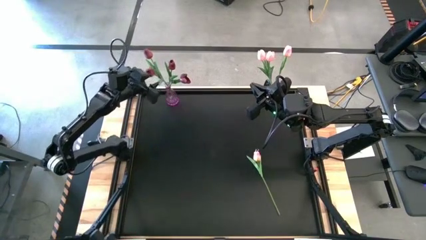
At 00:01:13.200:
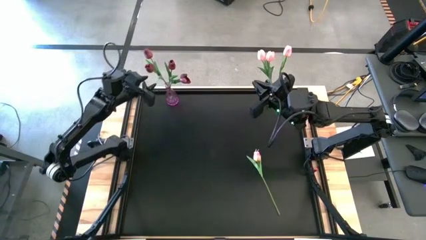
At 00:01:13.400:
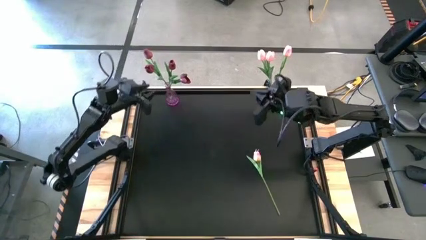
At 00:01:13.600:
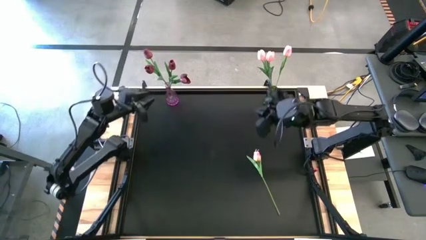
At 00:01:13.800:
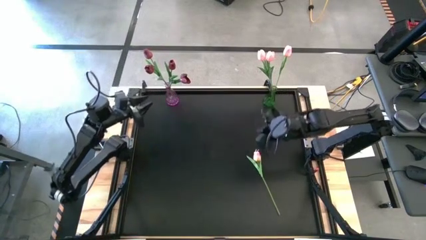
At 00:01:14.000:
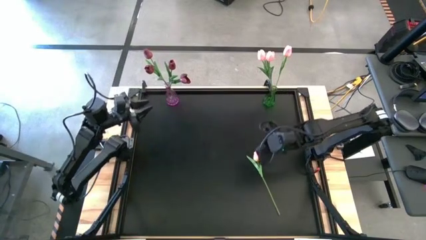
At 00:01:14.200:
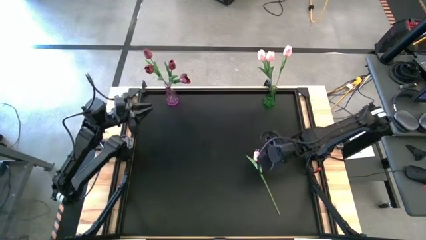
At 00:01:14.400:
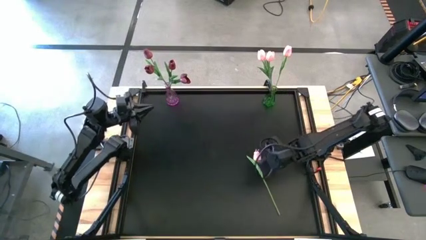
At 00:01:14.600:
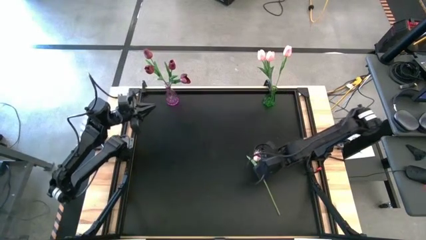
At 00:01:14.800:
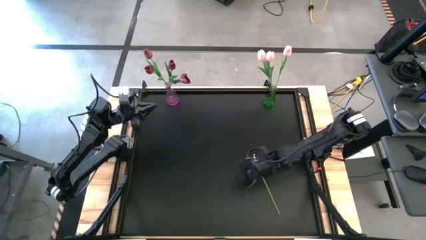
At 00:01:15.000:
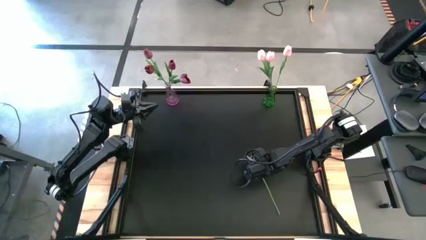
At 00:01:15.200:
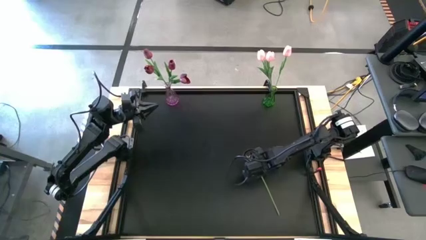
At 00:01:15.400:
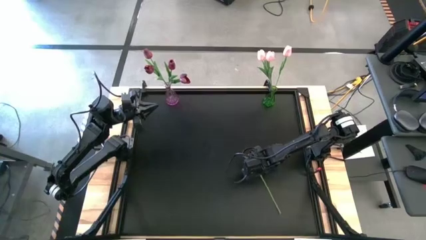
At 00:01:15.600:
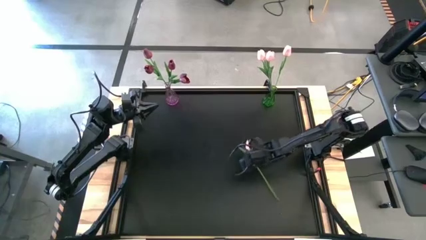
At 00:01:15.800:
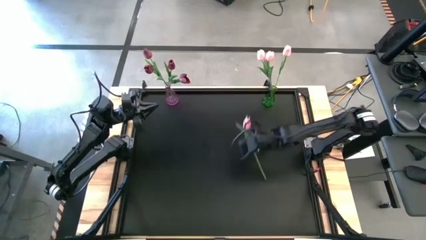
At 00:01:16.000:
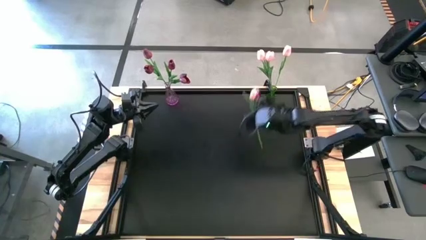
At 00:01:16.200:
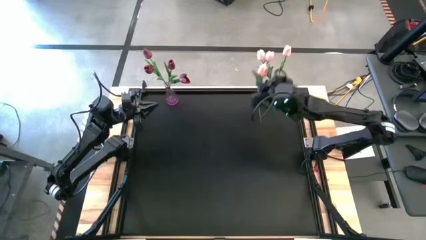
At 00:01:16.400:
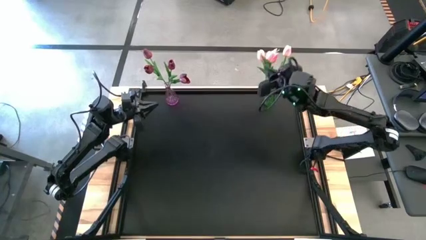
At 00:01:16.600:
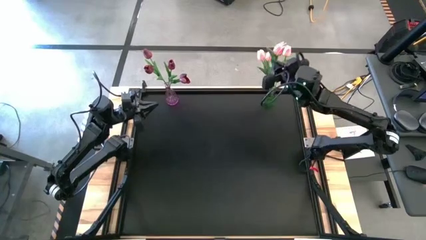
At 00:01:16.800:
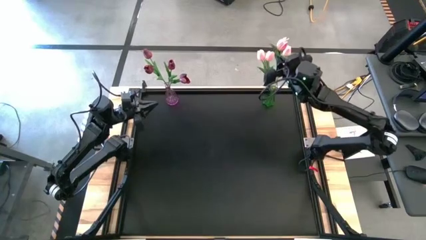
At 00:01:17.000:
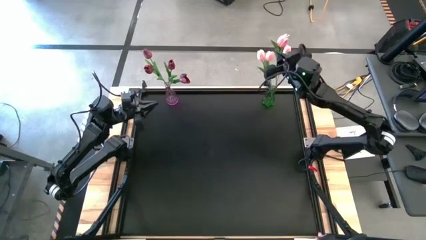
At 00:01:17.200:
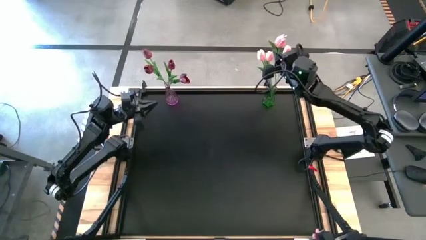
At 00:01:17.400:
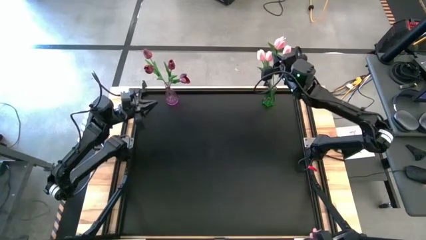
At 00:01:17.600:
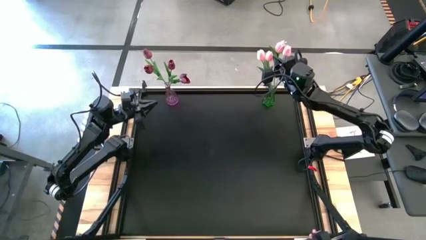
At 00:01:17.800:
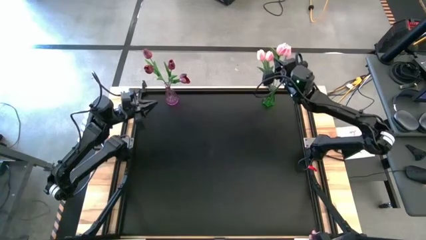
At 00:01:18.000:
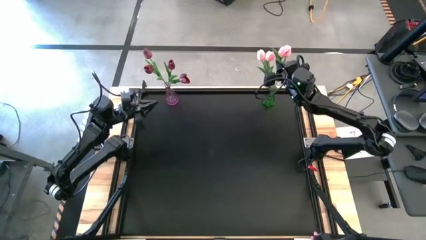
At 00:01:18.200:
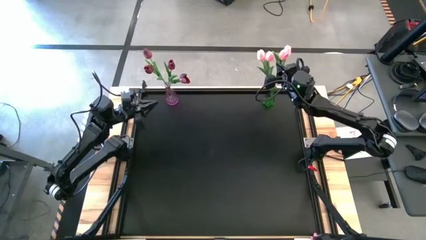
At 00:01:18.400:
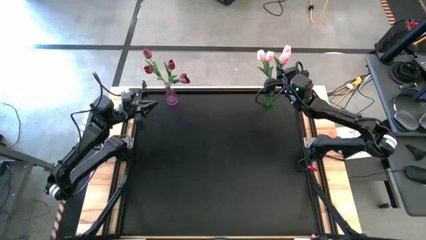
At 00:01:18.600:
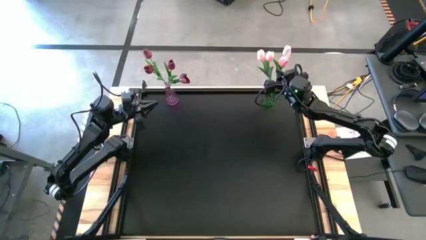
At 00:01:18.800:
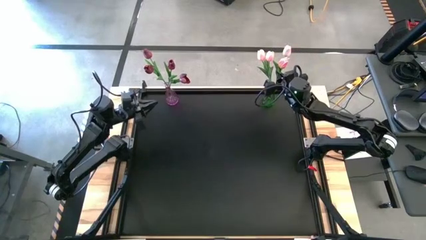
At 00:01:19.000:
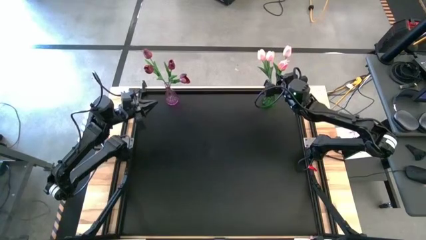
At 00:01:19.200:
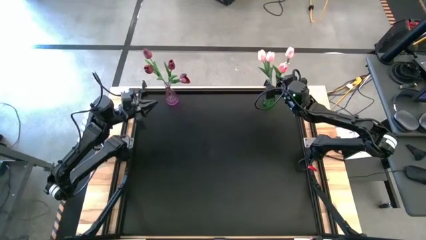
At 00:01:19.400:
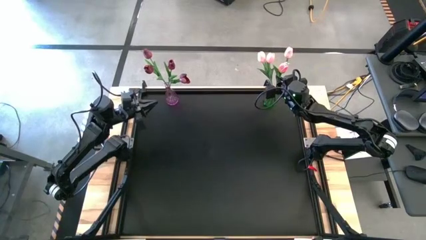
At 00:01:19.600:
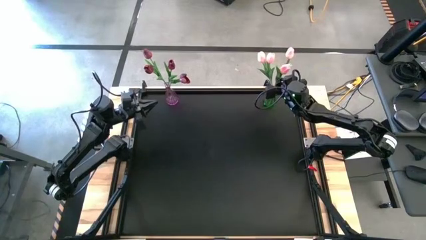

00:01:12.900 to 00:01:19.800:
Task: Sort flowers into vase by color
Put the pink flower into the green vase

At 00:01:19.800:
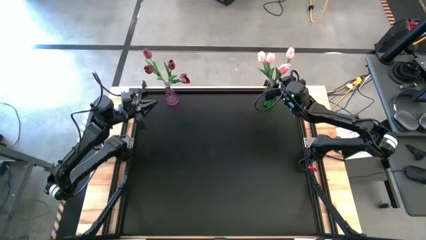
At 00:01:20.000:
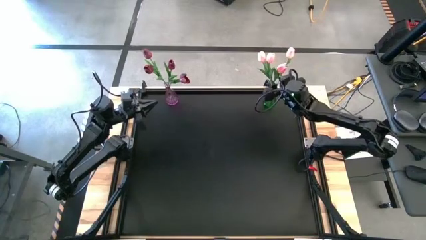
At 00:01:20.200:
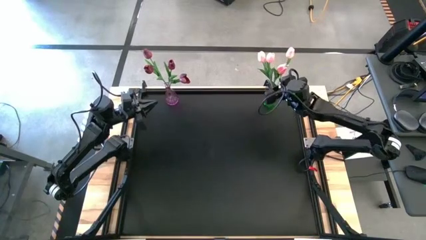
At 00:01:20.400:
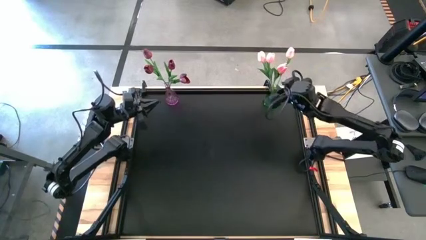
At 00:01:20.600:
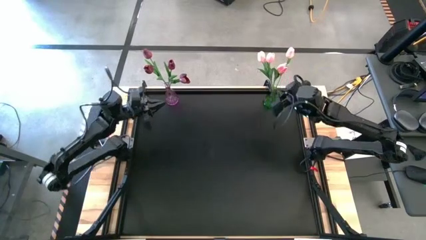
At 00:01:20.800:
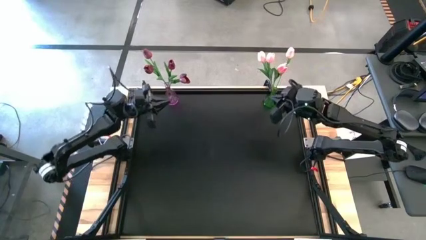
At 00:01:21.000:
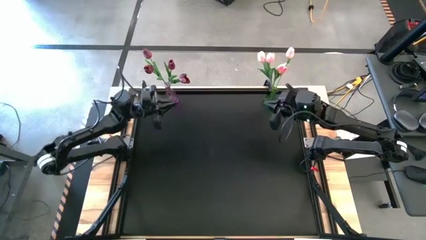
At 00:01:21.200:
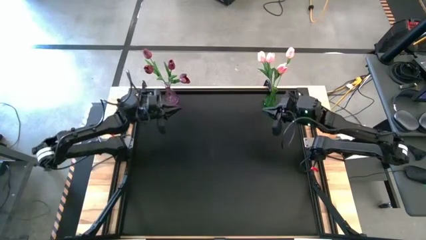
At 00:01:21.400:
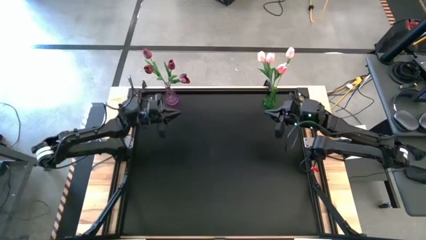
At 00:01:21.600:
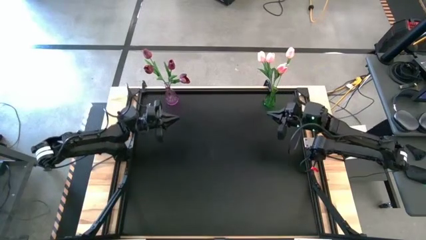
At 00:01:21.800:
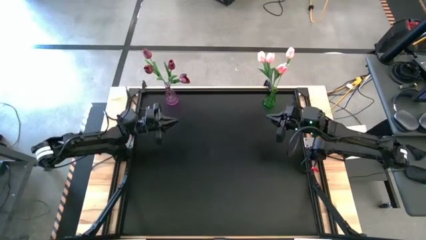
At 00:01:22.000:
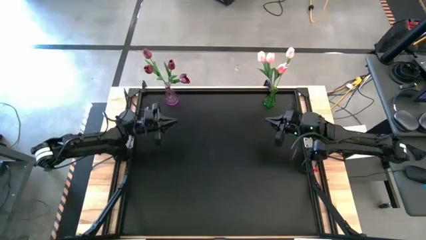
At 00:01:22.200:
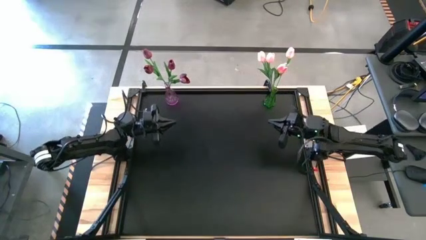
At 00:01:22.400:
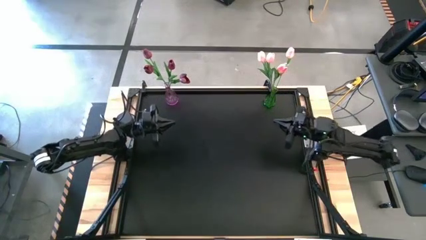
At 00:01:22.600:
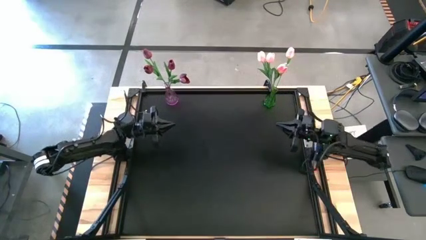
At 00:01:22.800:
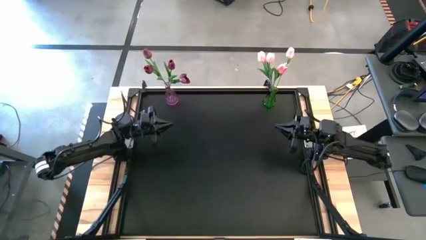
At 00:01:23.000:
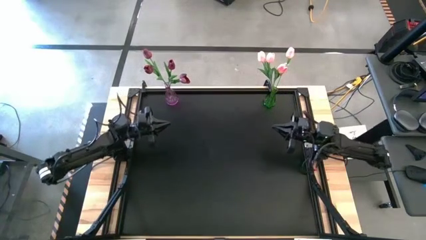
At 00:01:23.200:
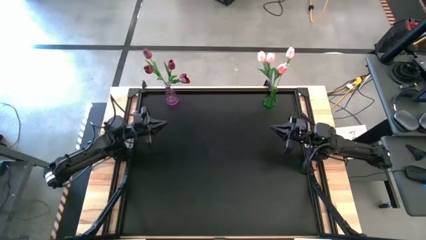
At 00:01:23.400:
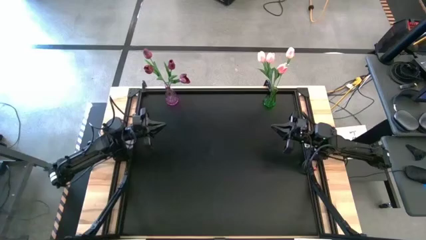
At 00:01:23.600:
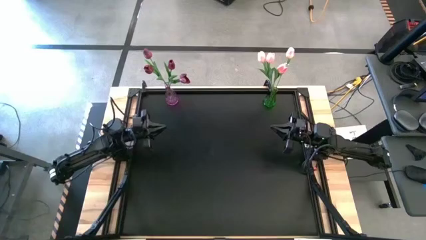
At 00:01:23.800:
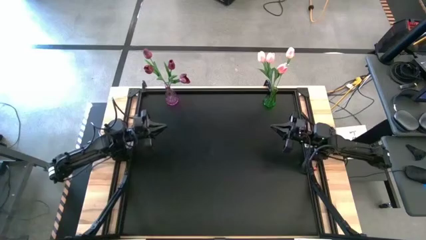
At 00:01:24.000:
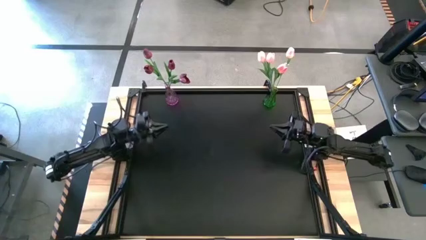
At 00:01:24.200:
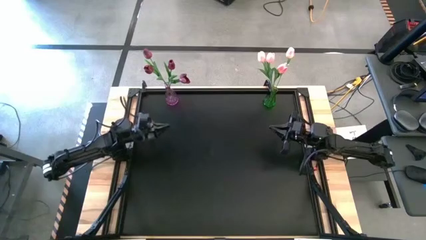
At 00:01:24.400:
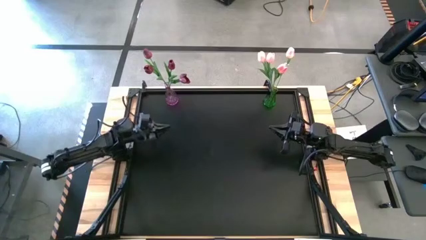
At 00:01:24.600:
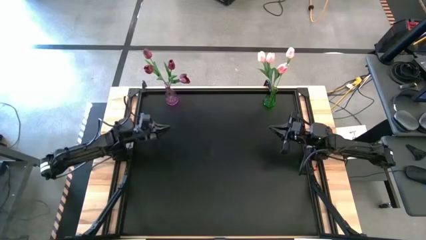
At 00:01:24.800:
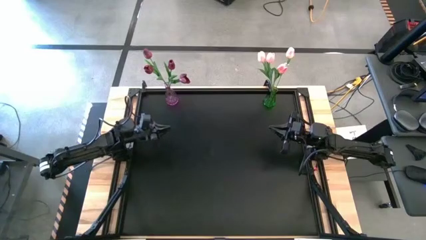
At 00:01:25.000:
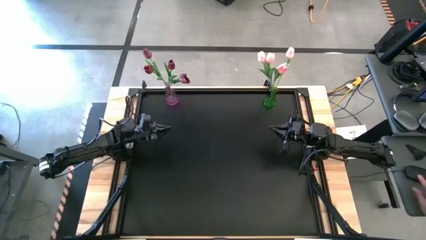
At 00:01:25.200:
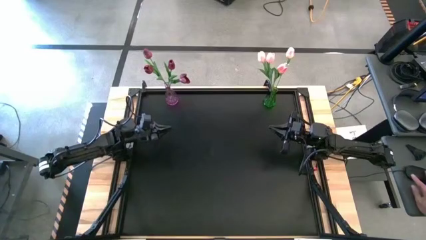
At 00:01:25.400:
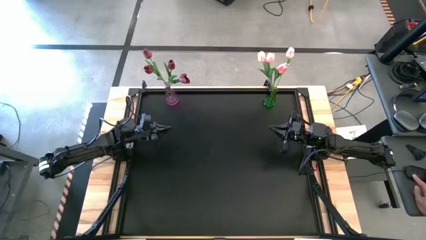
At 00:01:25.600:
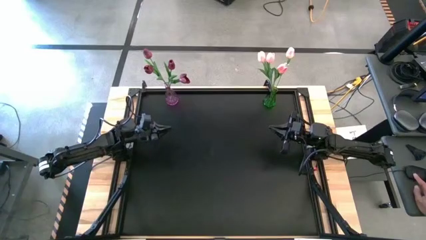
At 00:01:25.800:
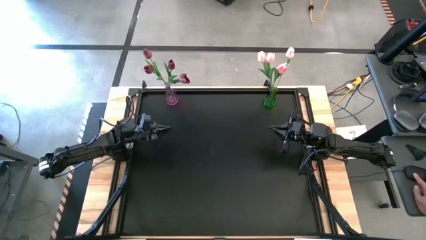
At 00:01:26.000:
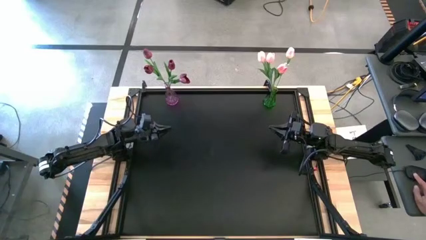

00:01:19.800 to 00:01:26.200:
Return to Home Position
